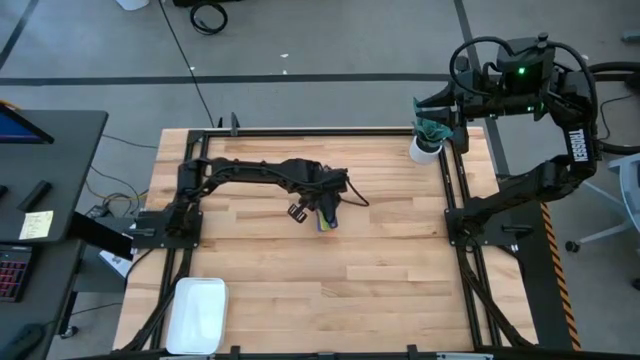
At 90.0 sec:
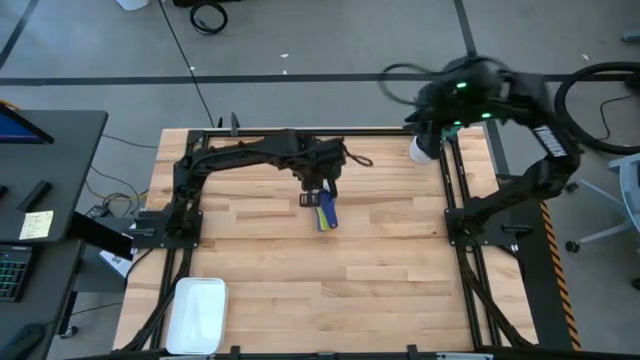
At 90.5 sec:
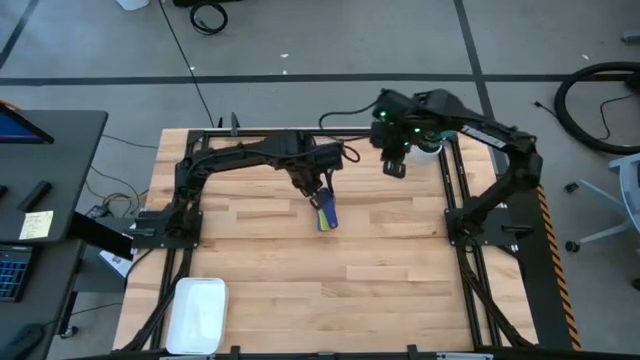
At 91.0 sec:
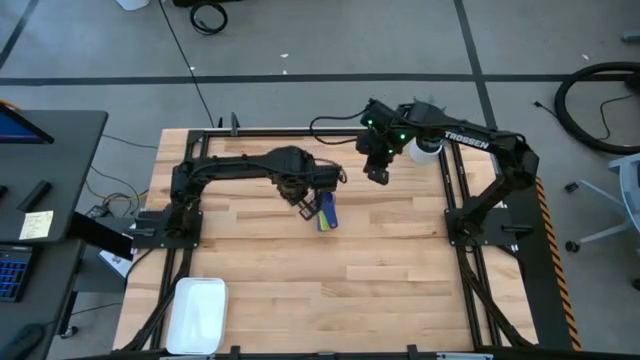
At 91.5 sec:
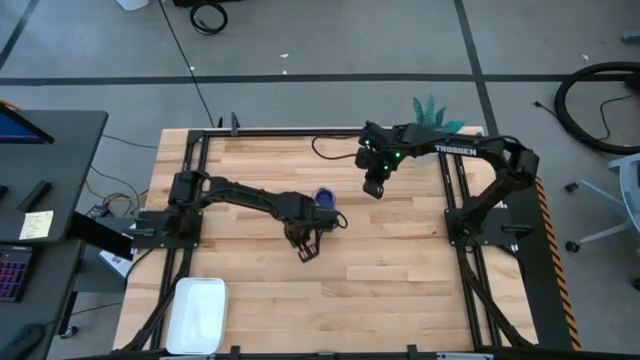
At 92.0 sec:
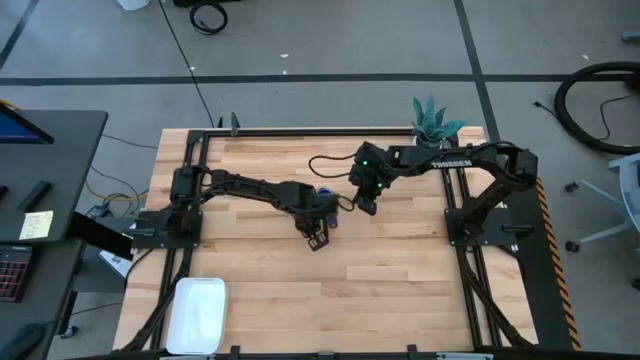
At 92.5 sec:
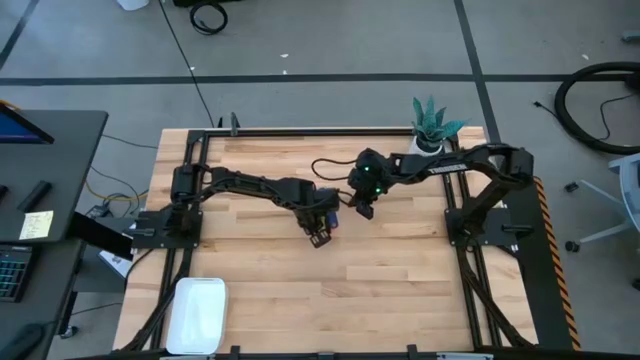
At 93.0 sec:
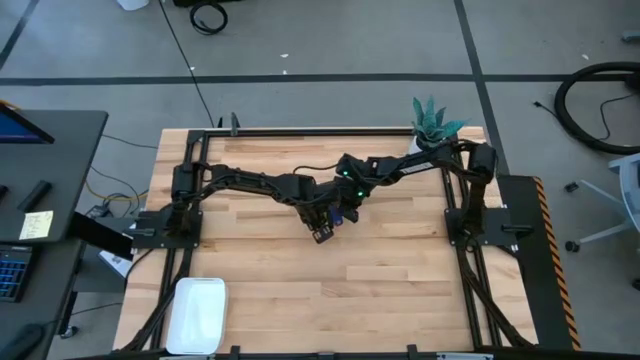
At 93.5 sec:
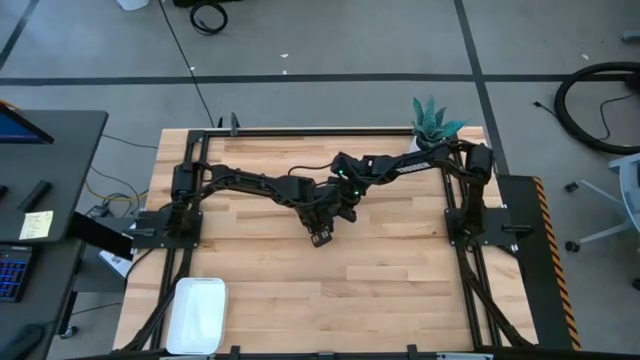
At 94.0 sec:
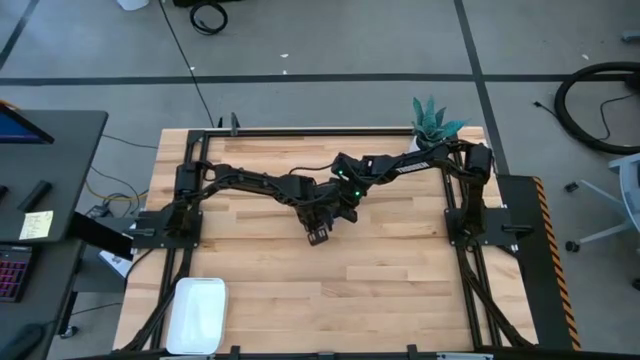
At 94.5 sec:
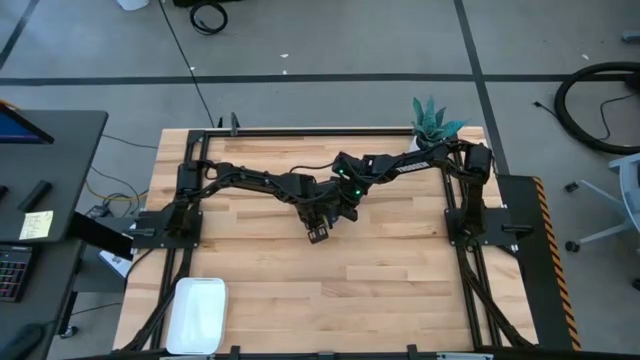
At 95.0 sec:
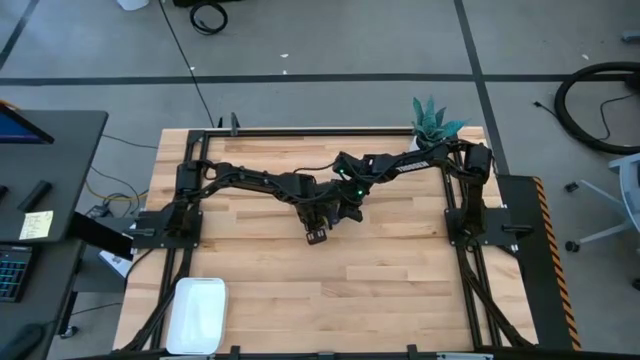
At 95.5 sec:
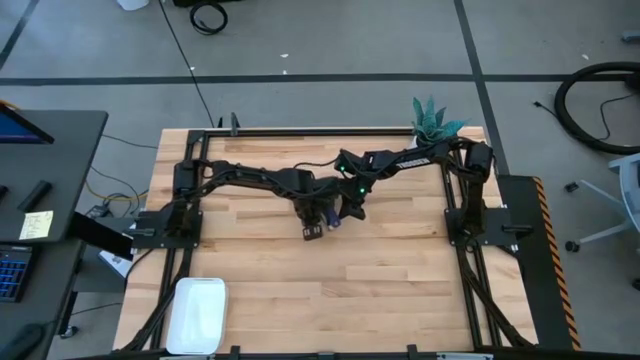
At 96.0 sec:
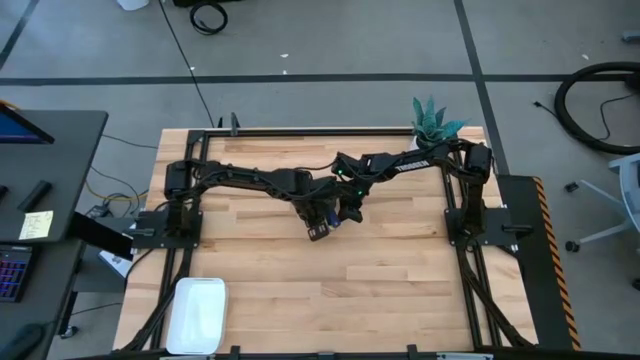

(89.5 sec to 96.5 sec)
Task: Nest measuring cups in basket
Adjust the nested measuring cup

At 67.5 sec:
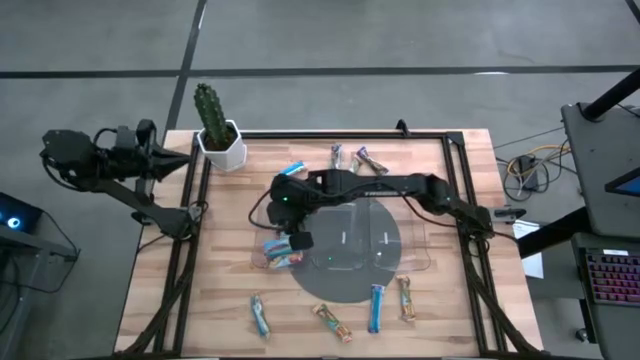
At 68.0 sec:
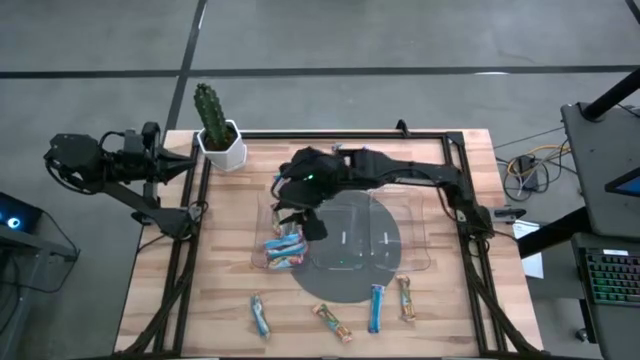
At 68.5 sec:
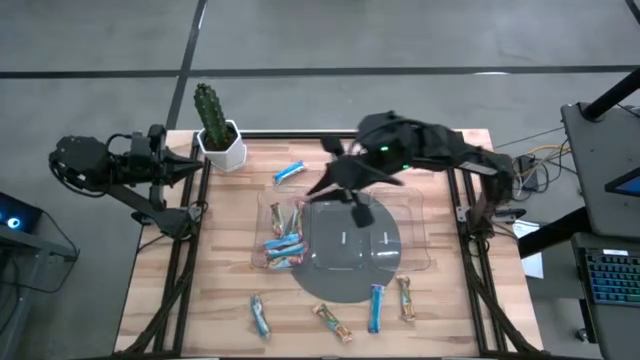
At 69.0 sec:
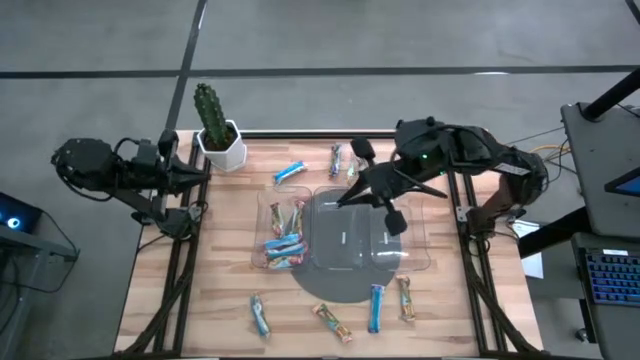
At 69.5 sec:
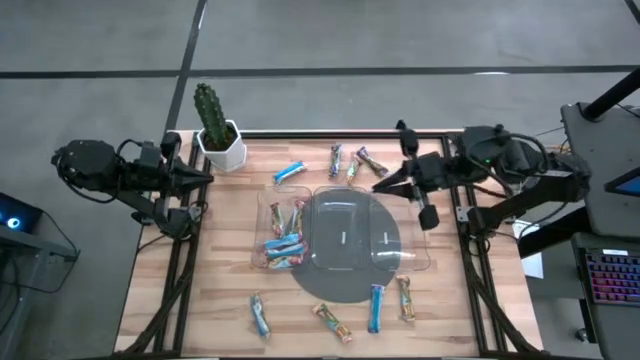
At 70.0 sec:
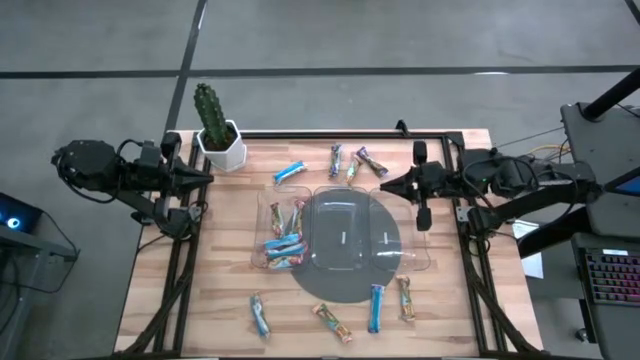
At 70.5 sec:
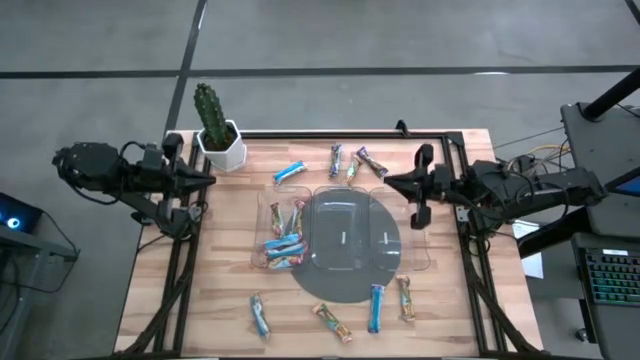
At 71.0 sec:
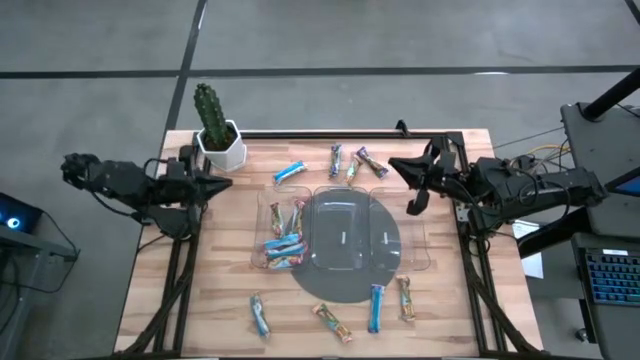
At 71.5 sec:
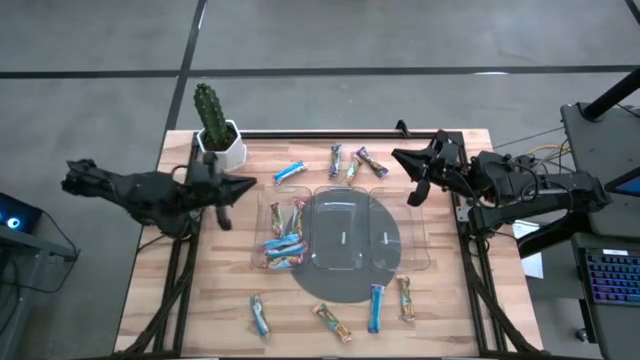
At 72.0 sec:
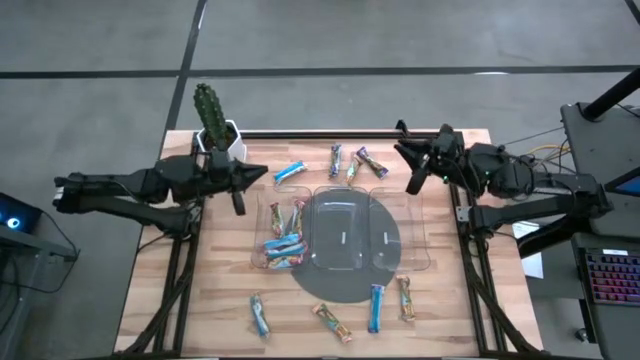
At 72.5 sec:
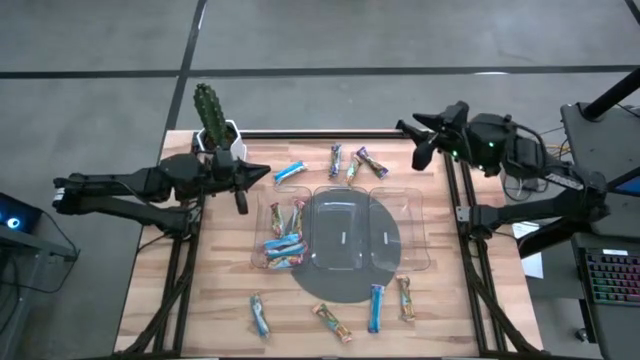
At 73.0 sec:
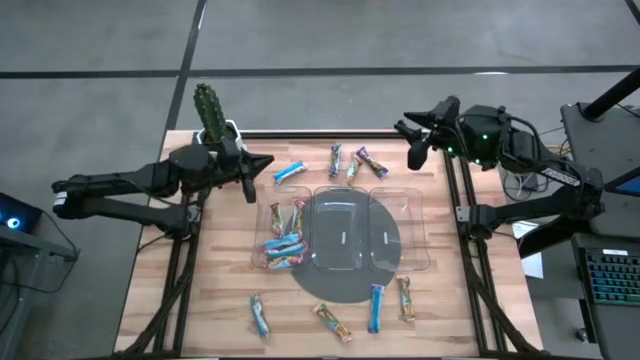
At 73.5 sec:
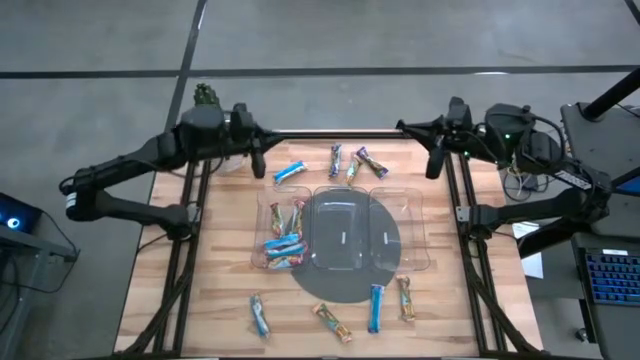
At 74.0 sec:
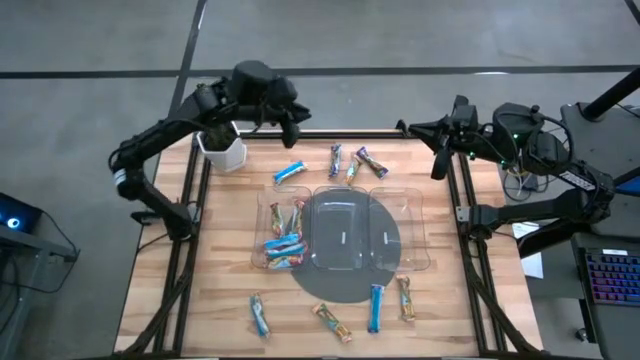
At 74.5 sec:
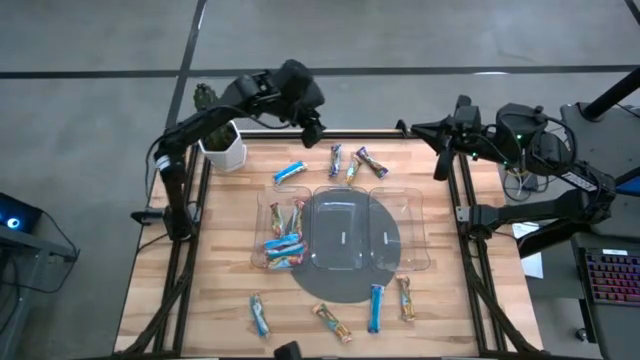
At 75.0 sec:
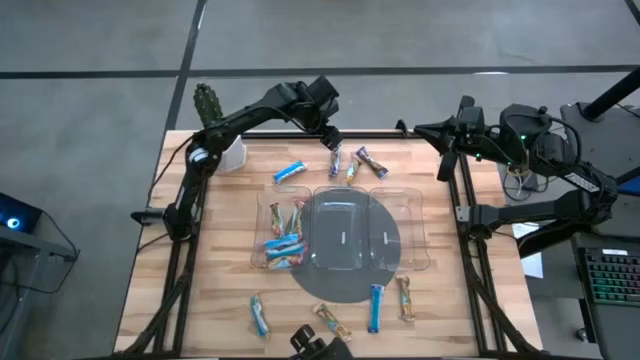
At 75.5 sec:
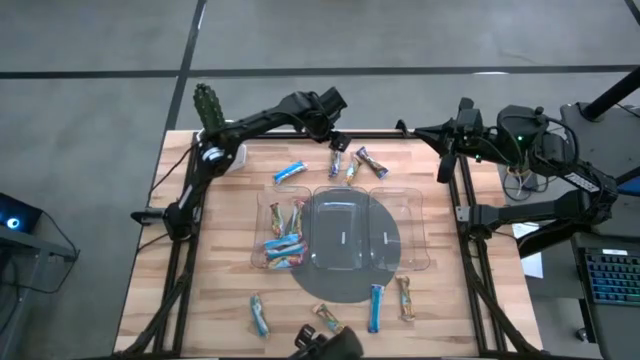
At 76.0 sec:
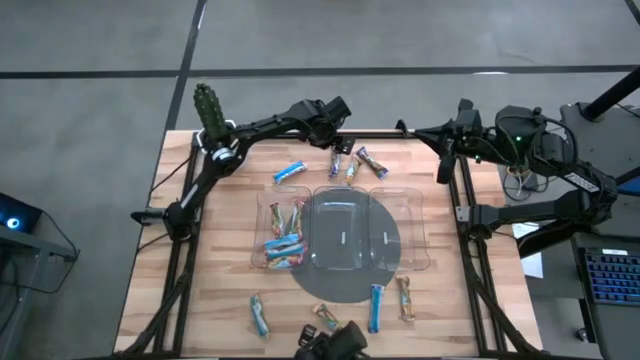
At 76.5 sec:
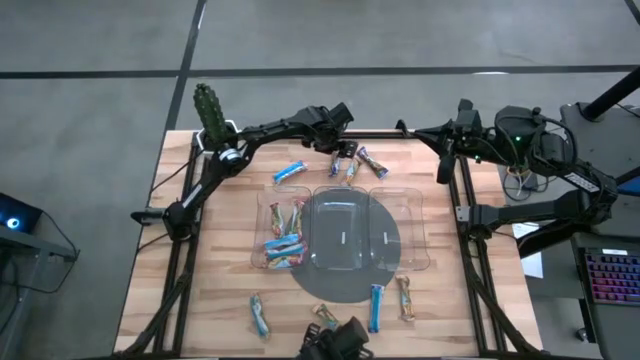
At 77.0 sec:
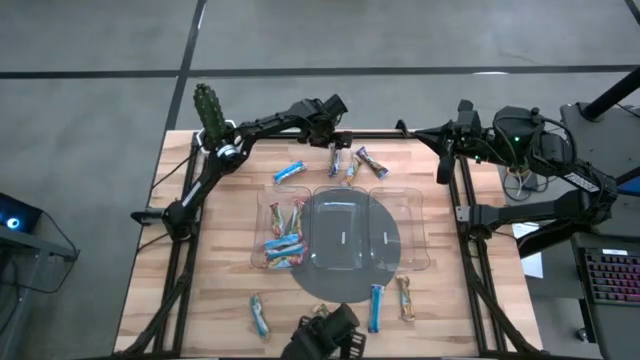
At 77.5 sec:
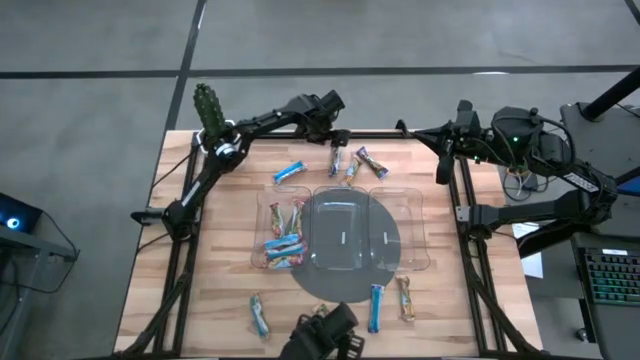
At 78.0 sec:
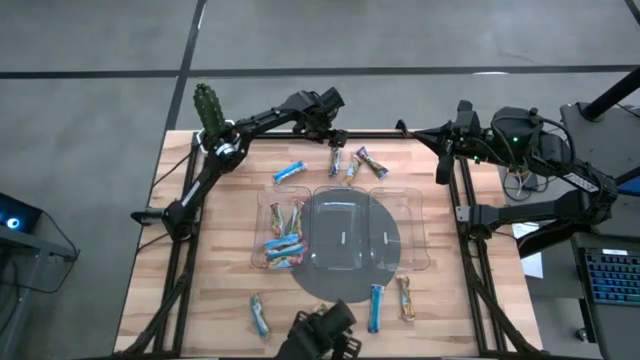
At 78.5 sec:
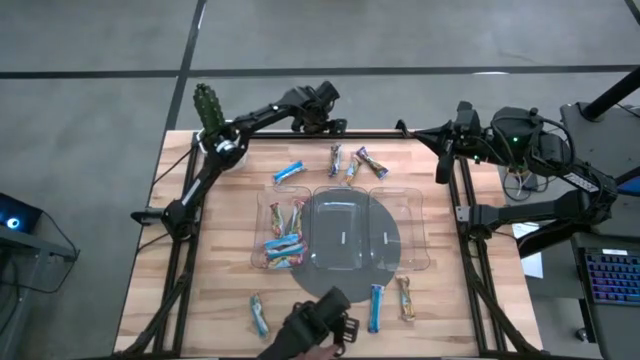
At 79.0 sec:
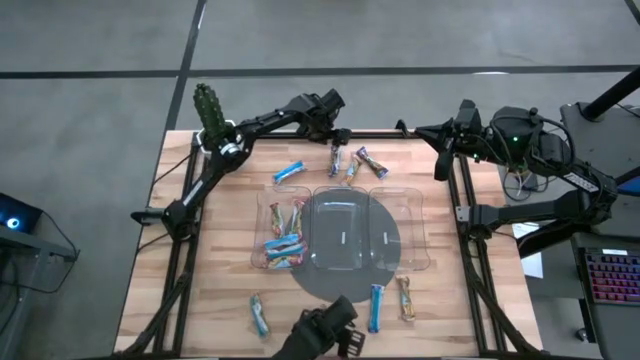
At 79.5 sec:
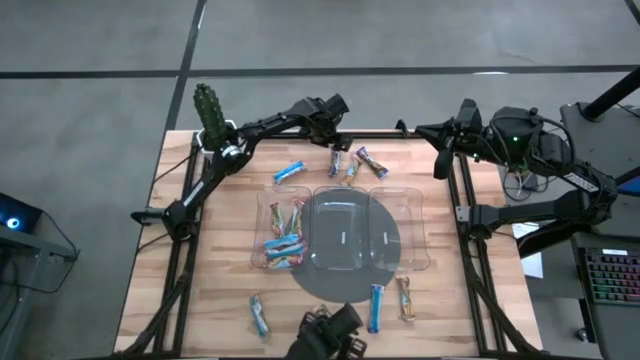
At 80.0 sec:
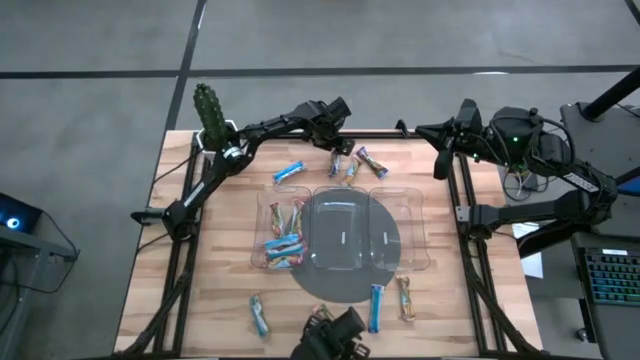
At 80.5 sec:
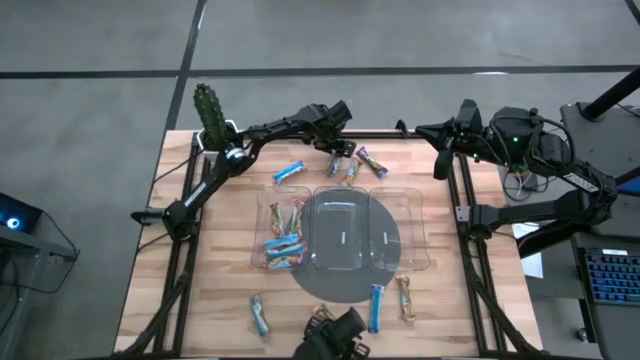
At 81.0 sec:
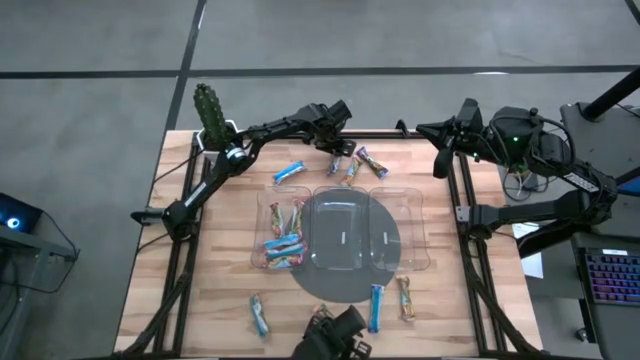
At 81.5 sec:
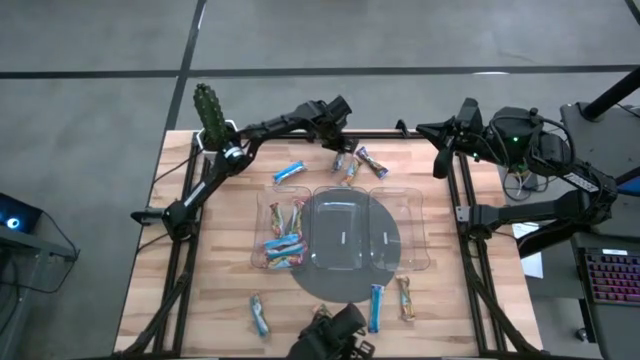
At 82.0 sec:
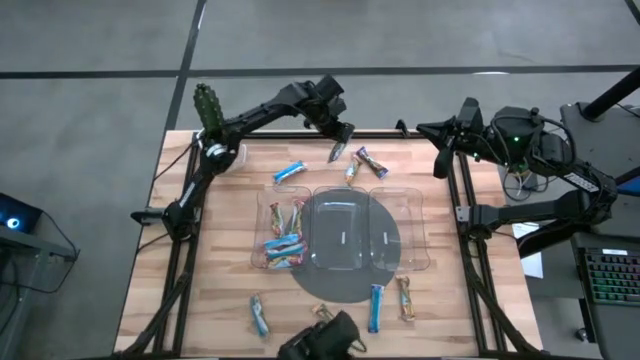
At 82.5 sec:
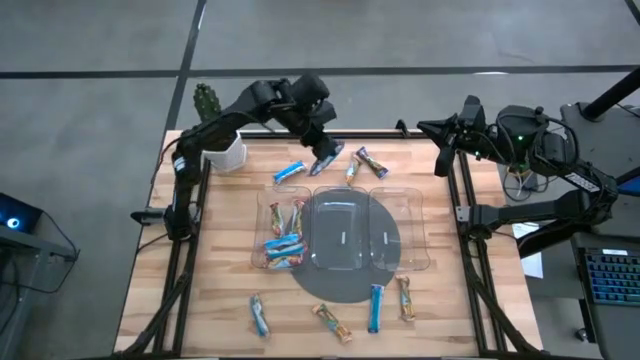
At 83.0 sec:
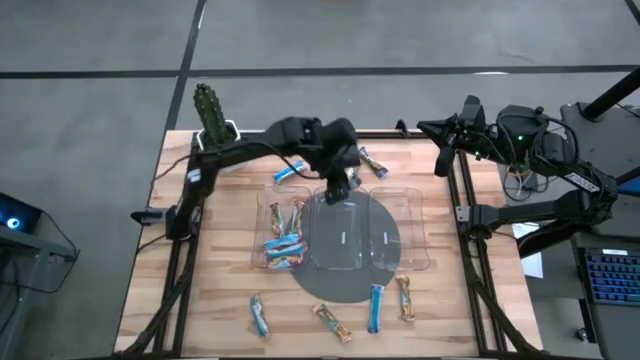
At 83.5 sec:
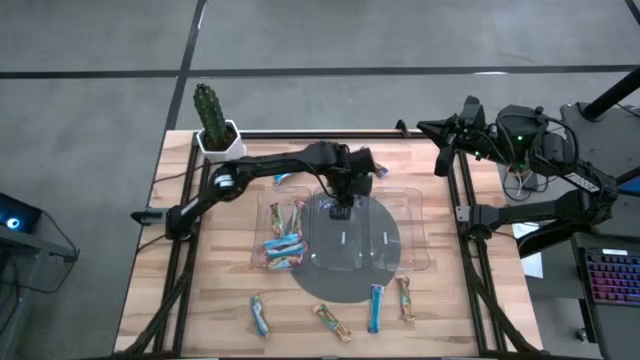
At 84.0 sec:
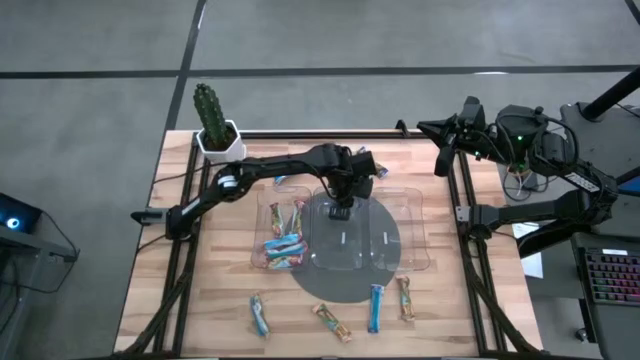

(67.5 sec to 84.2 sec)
Task: Pick and place Granola Bars by type
Put the blue granola bar into the middle transparent bin
